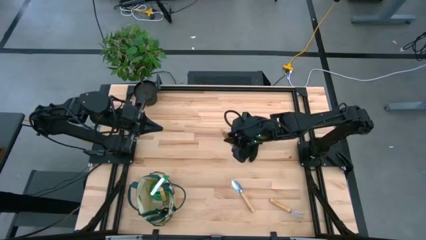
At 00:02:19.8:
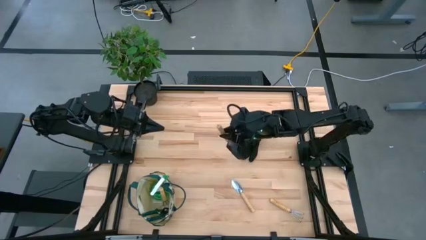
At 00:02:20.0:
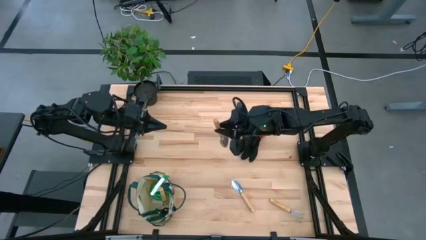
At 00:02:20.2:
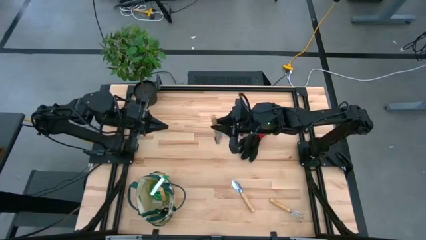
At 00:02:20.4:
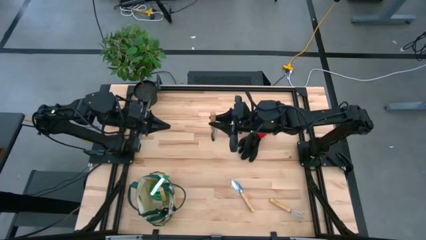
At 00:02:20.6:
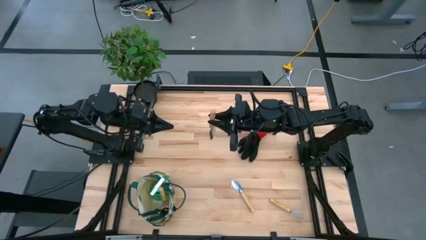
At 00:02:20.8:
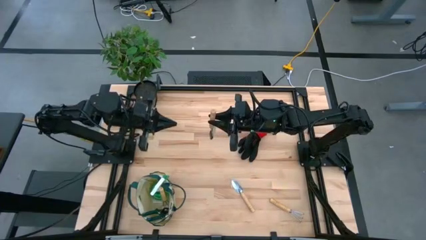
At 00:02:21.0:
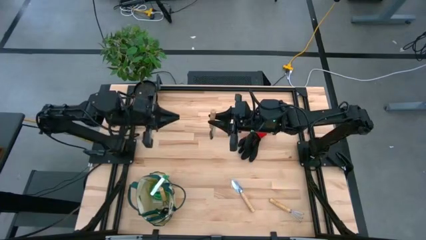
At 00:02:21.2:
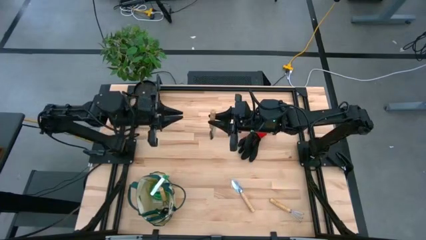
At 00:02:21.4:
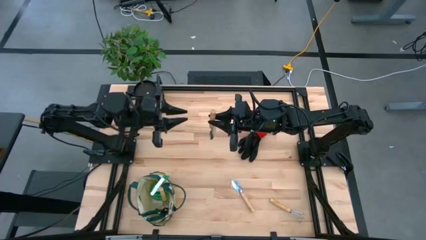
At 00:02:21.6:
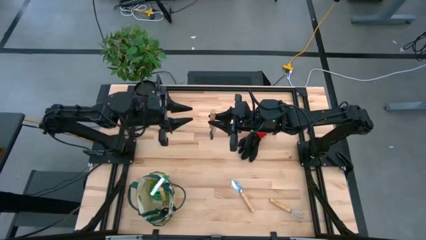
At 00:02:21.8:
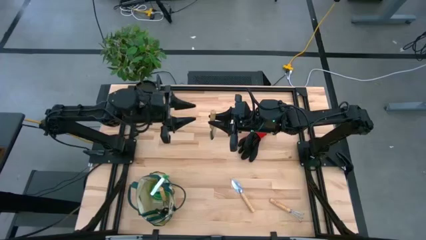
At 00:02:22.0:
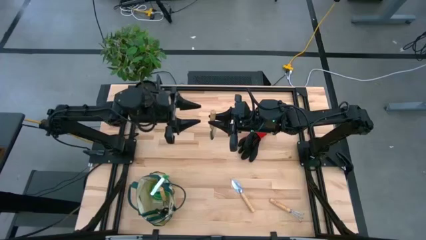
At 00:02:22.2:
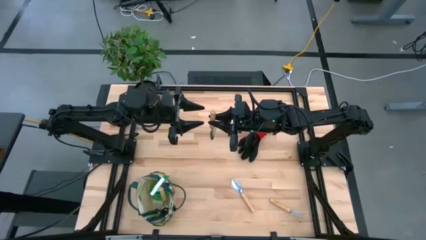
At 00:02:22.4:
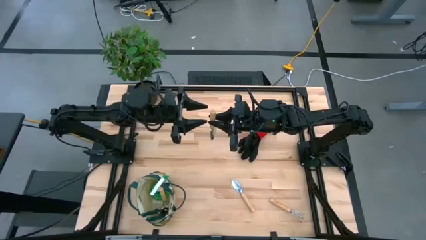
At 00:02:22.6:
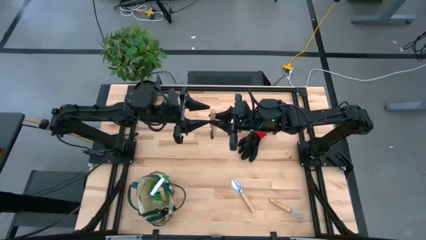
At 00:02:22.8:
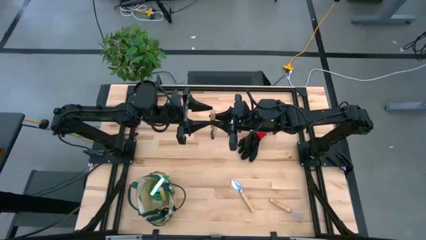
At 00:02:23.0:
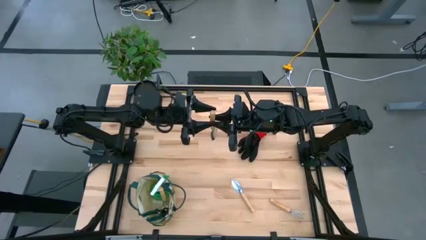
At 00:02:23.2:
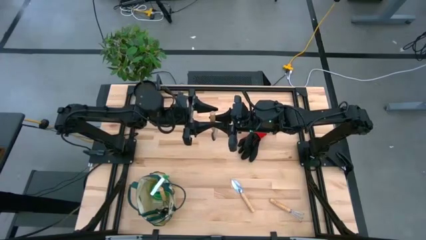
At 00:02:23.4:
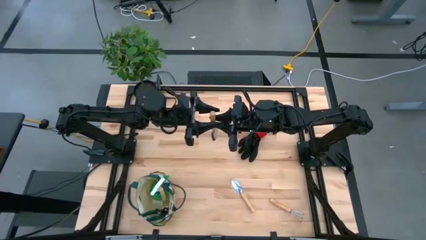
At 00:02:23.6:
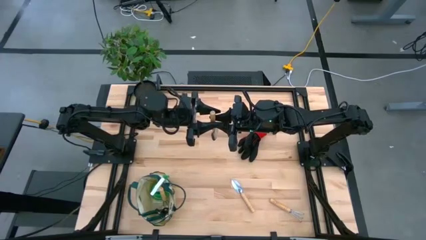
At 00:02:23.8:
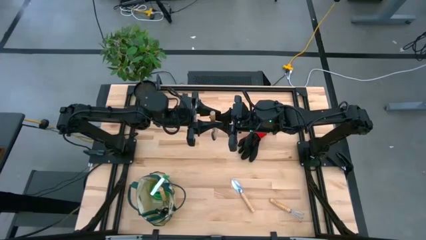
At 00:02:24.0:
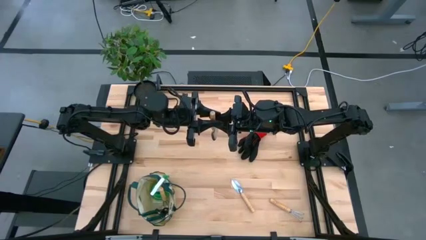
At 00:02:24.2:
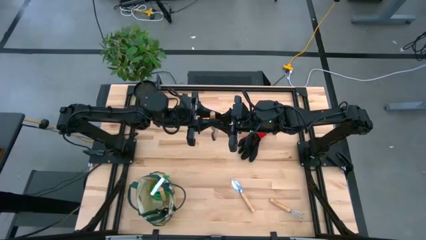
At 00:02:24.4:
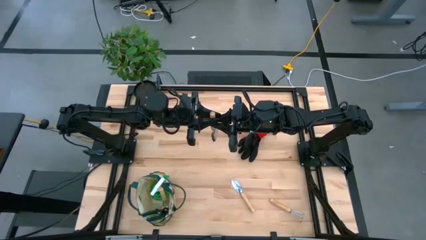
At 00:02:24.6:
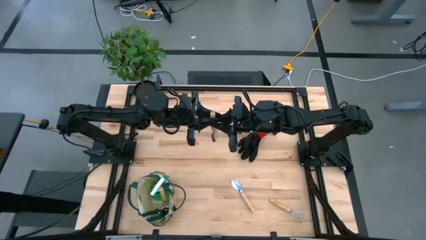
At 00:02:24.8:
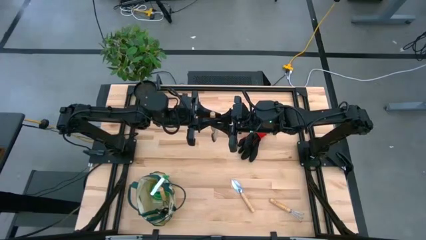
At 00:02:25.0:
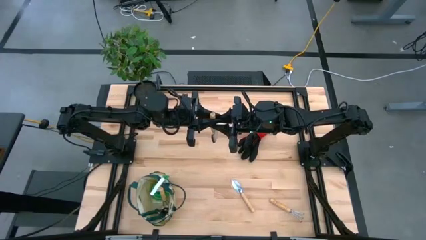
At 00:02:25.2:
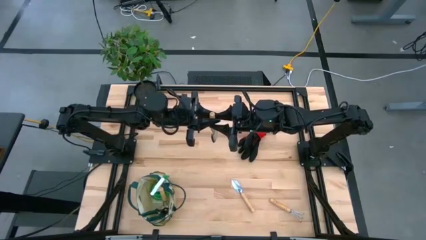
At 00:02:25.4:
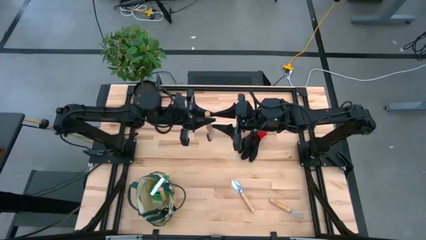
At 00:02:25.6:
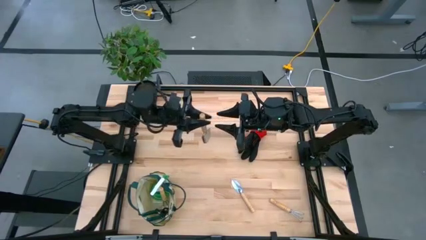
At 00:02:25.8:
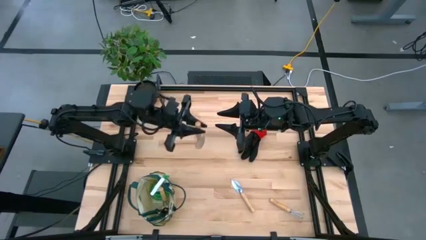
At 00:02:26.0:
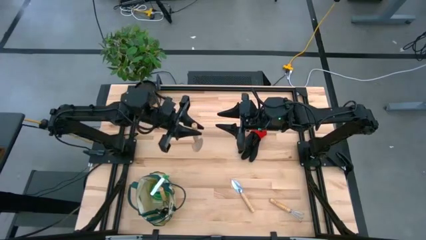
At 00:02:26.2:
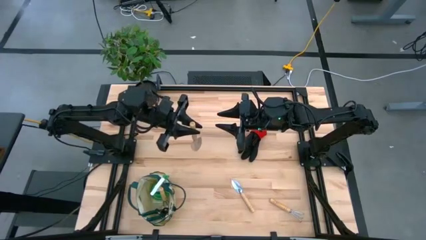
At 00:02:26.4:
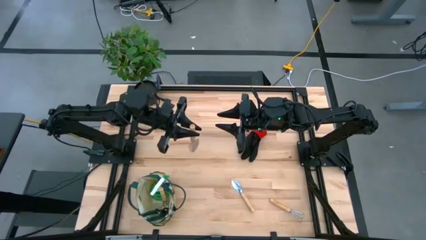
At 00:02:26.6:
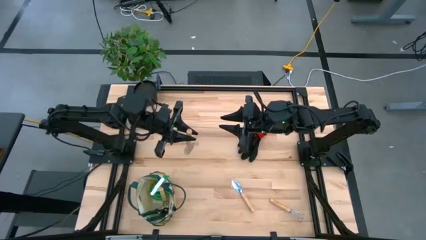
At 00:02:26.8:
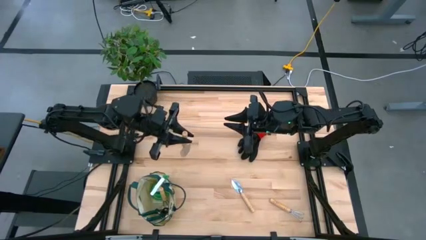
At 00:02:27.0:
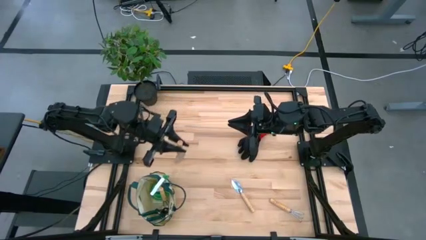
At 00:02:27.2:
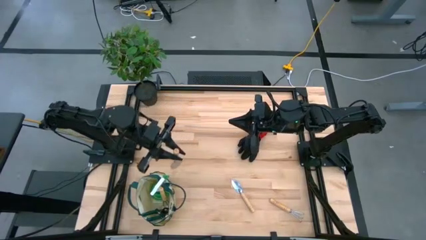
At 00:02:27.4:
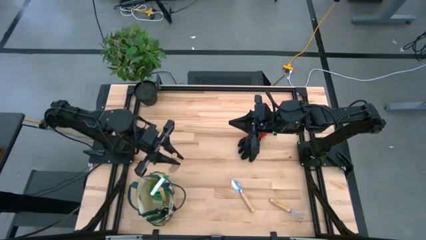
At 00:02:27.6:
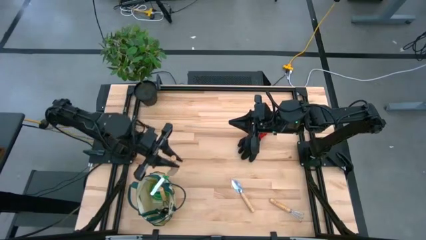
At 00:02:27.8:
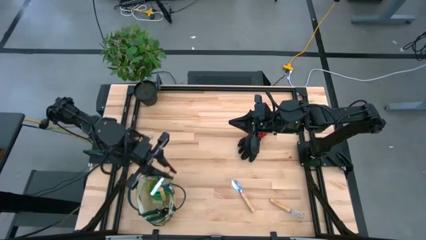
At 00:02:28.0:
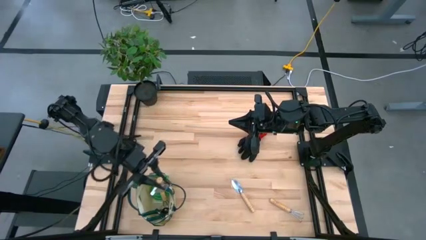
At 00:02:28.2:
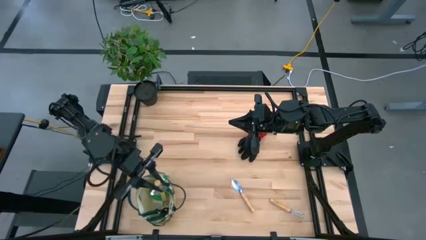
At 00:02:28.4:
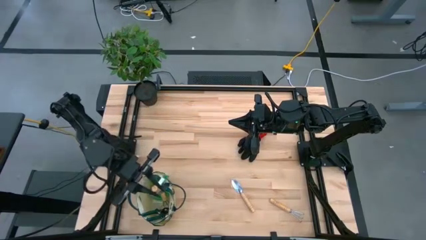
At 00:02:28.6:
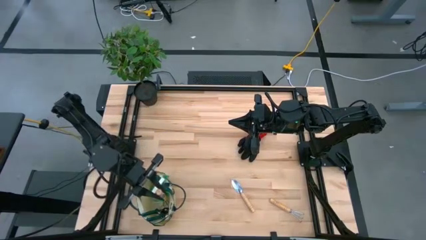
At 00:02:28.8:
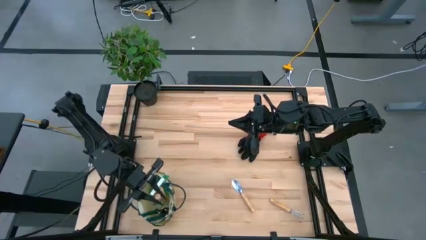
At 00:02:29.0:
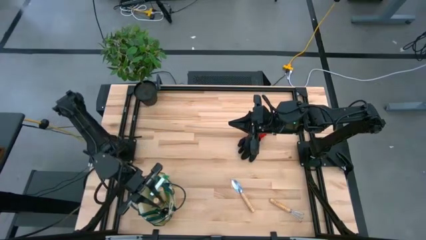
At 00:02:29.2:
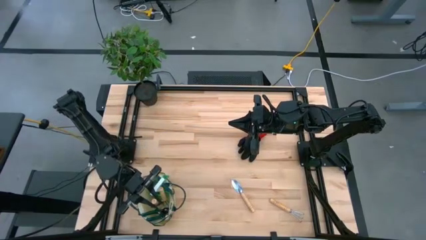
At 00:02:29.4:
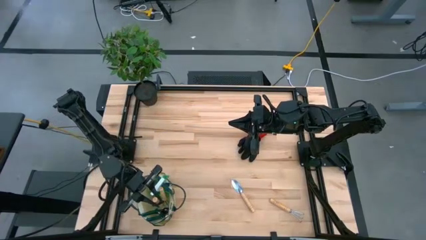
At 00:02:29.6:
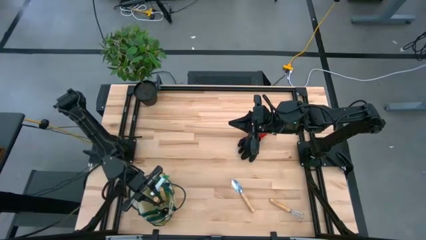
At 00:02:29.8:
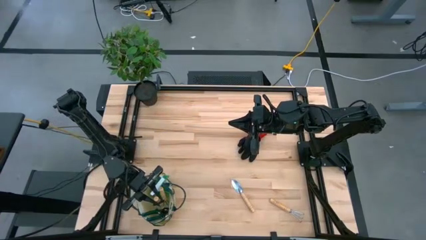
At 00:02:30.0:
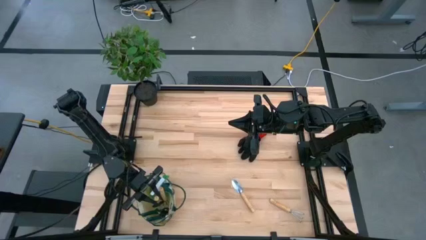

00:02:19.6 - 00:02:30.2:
Task: Pick & Place Garden tools in Gardening bag
Put the right trowel into the gardening bag
